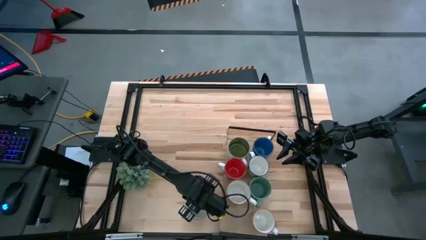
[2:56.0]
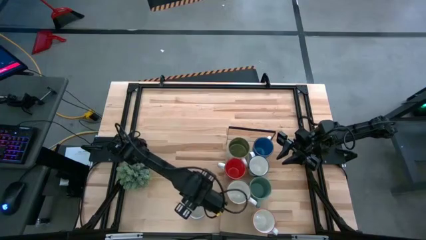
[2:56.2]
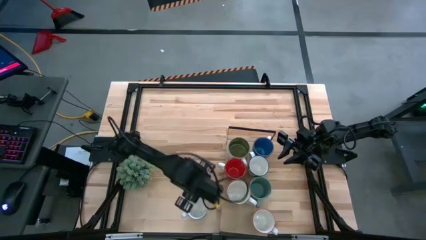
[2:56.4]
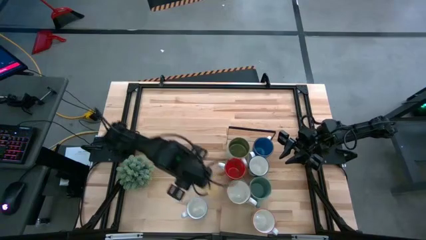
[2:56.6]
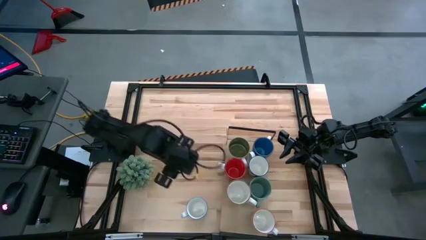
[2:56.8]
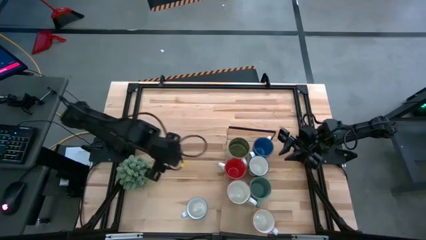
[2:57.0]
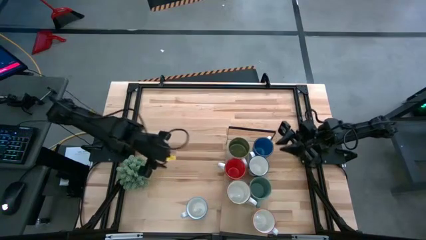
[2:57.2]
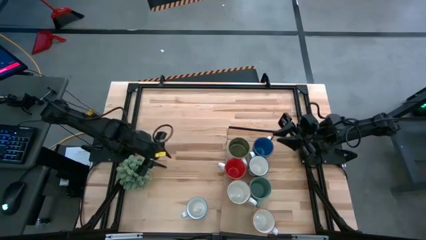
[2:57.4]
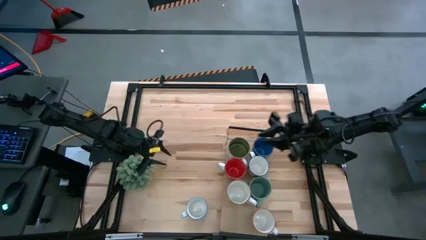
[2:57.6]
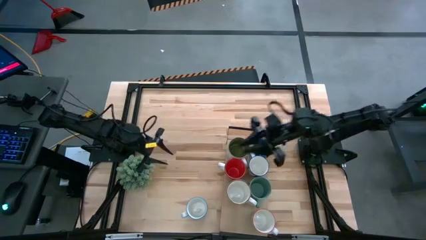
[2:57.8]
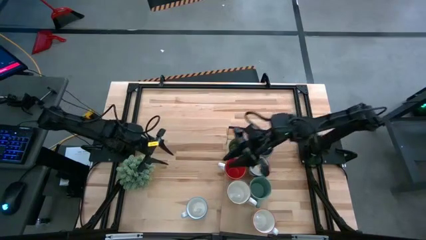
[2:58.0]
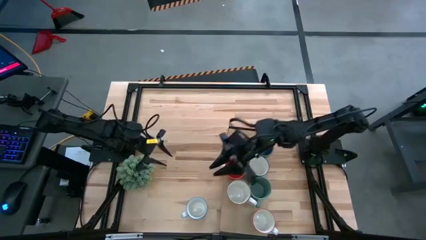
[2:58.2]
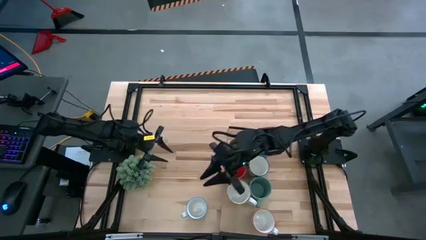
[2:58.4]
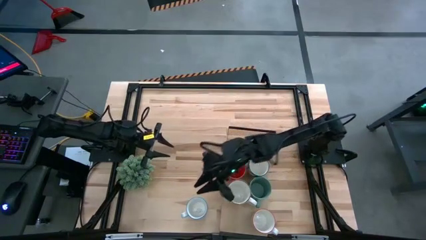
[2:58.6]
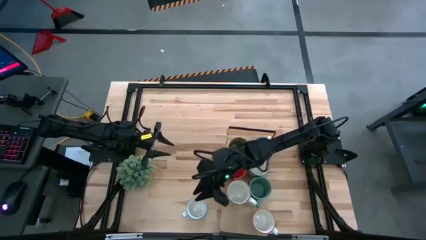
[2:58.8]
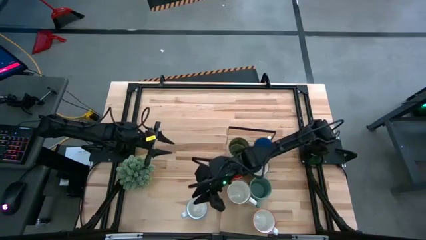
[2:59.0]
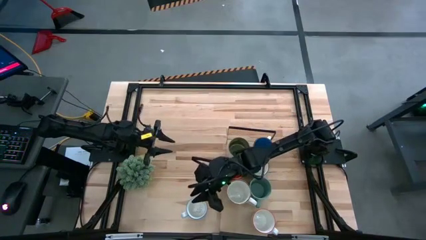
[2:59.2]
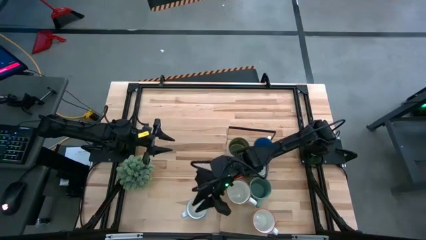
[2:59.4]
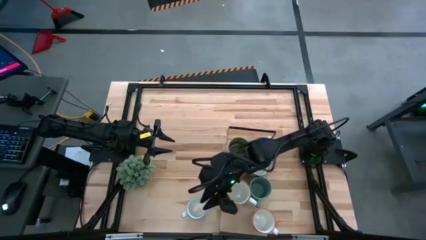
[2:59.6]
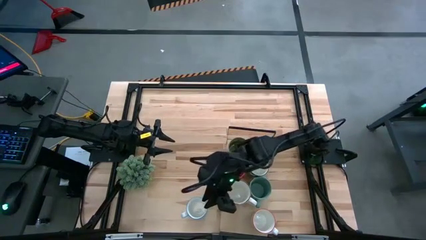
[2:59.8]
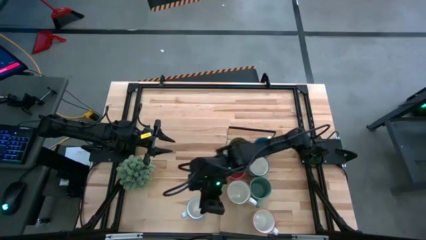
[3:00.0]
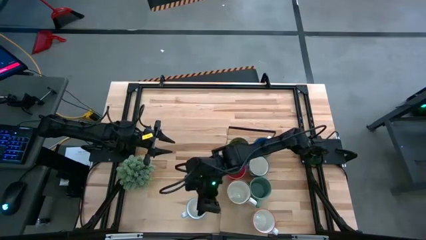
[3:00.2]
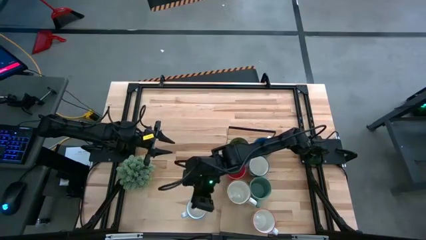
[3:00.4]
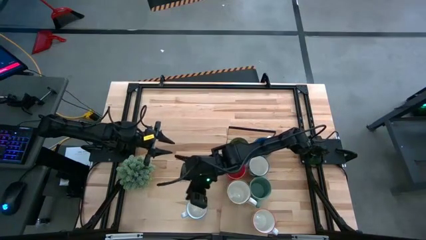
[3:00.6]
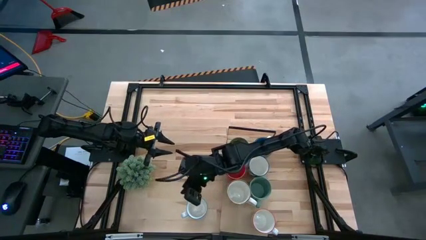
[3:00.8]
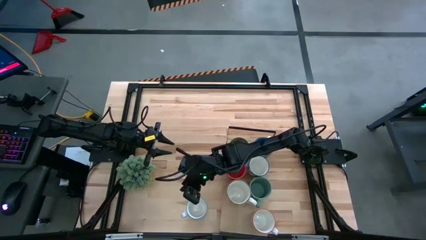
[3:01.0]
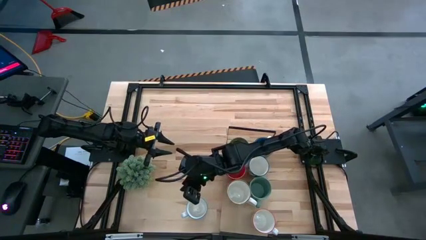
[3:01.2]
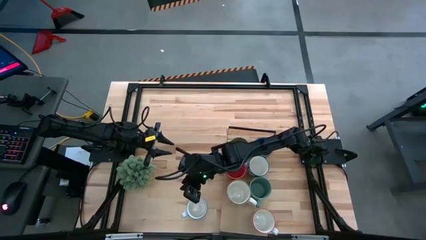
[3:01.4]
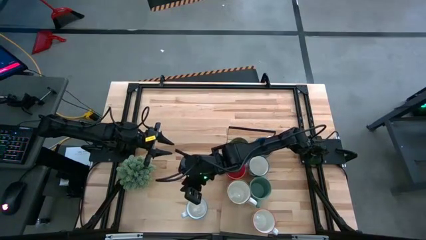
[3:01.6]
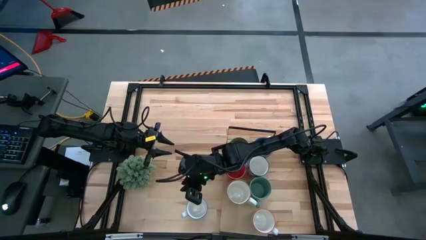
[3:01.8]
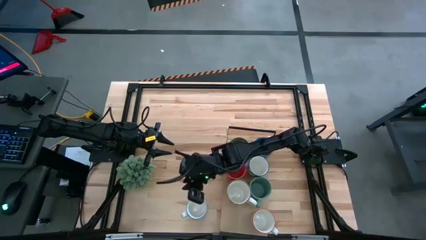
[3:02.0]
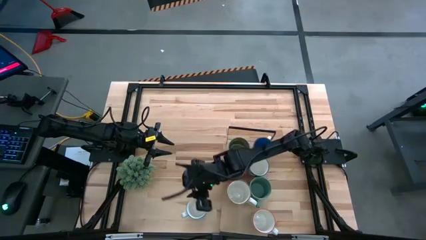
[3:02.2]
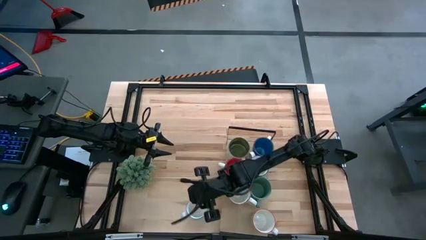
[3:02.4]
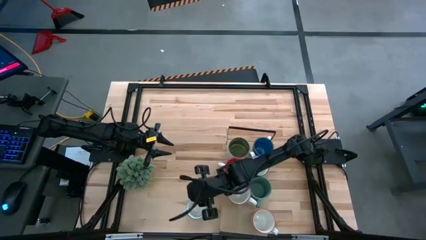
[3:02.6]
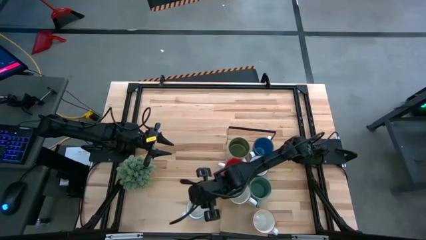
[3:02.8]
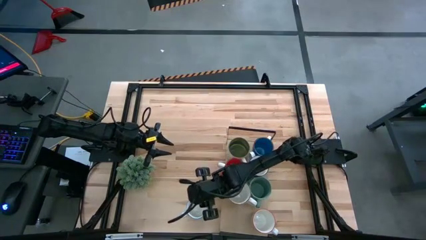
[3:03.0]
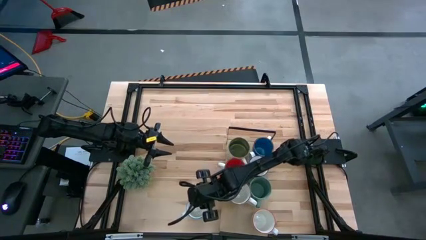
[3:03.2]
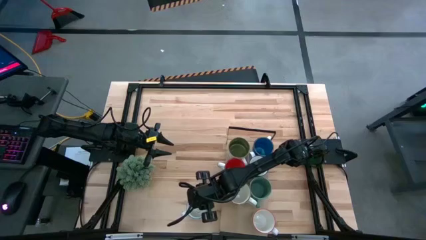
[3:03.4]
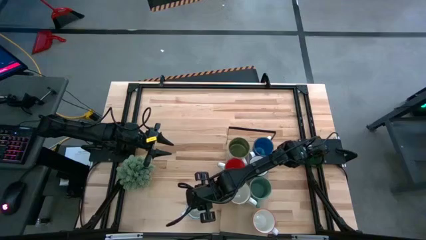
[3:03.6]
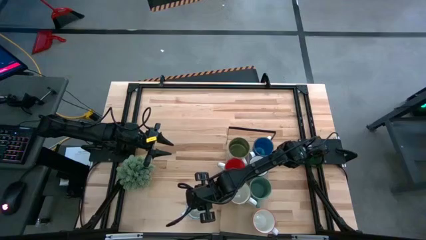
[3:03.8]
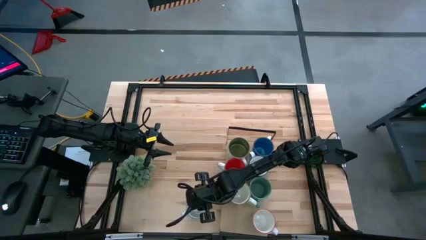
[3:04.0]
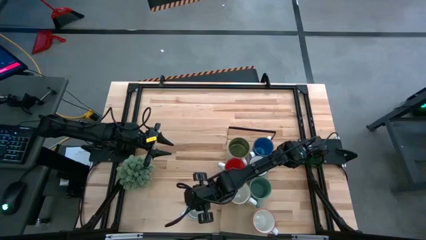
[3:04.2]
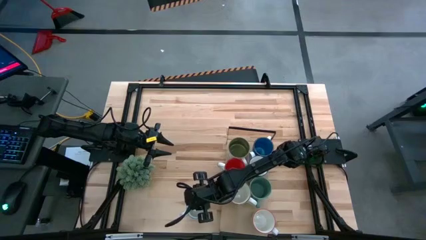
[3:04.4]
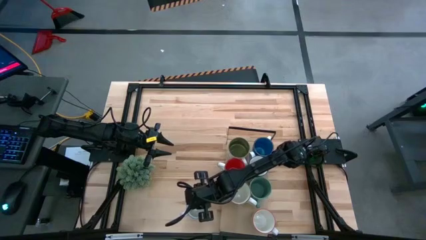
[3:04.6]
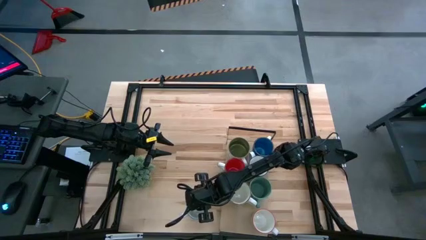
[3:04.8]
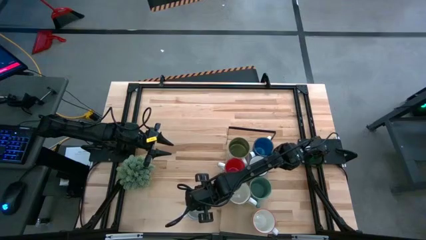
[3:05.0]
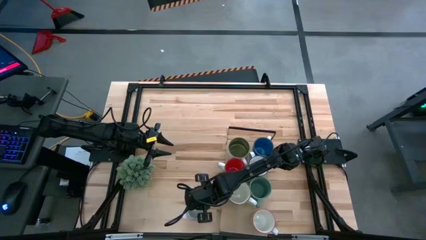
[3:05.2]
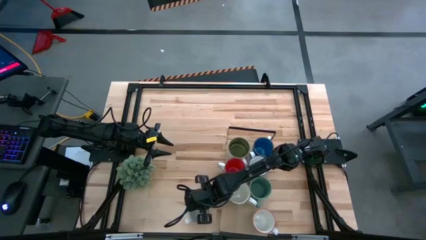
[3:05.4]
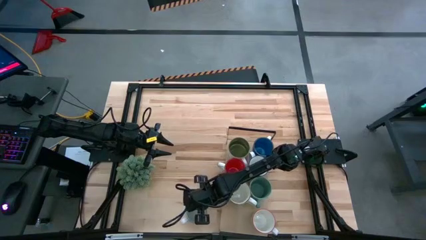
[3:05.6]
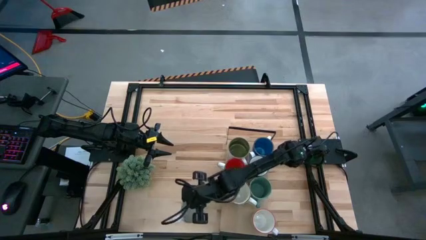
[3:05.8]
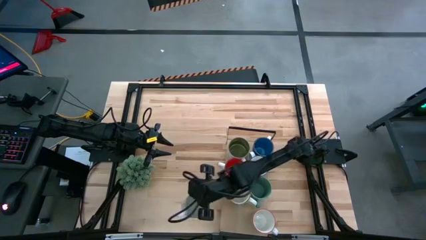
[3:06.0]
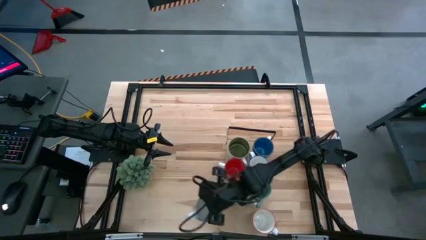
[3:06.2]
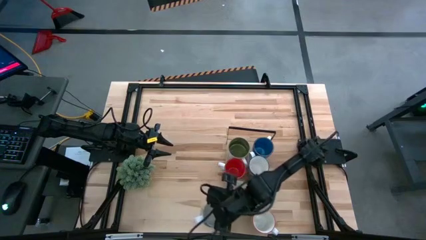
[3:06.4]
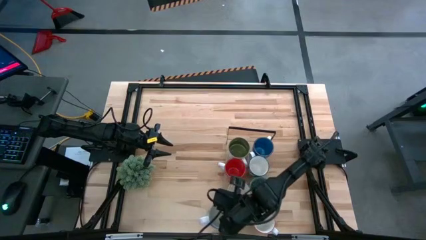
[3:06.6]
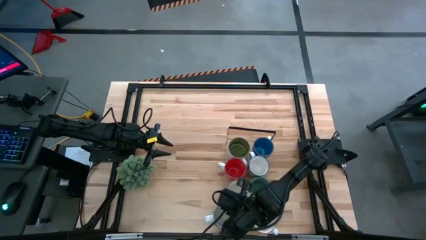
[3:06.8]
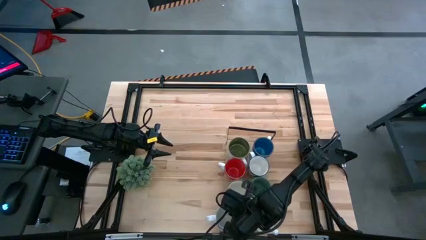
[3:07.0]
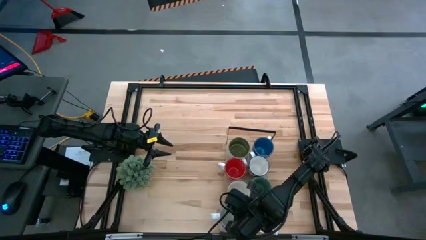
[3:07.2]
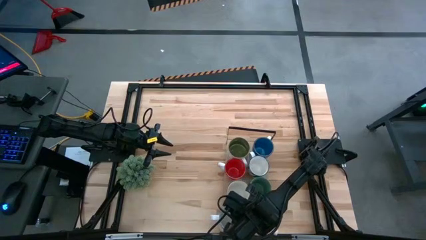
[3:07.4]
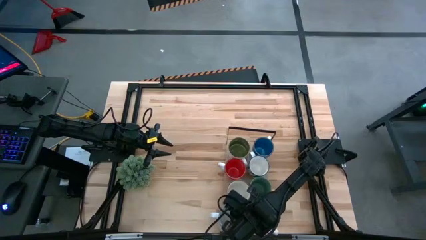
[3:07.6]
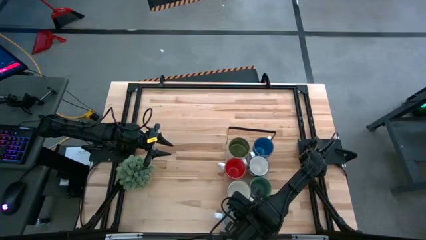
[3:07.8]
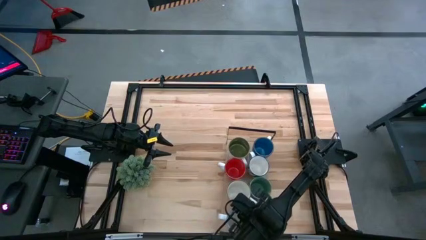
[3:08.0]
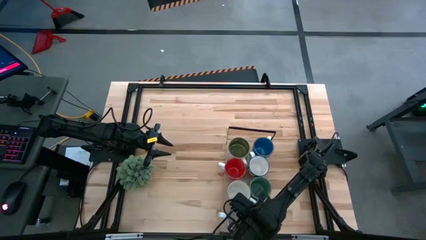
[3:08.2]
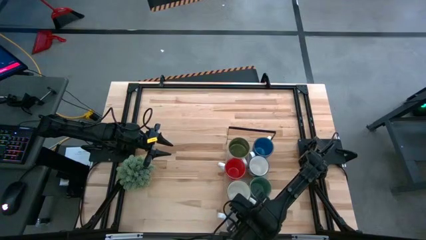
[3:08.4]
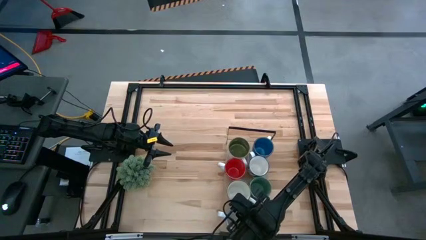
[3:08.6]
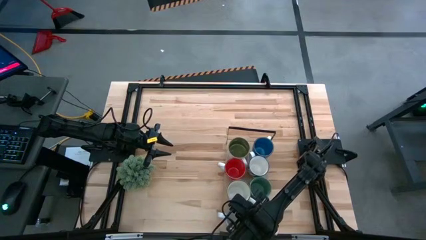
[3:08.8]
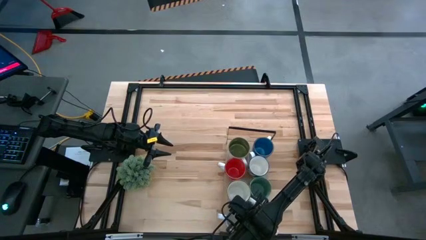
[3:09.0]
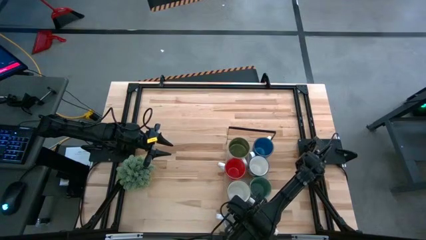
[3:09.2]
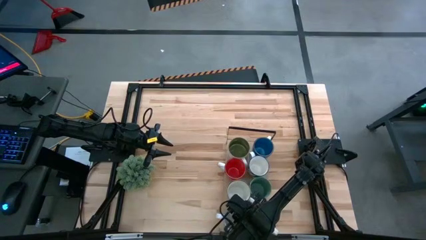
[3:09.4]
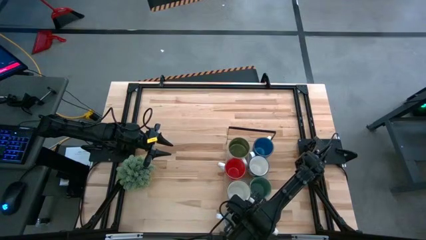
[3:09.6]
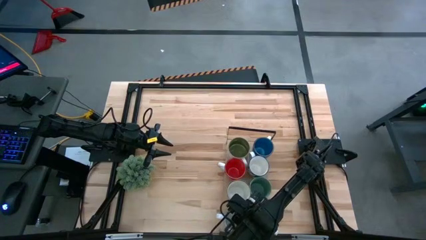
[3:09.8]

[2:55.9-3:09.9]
Task: Place coffee mugs
Put the red and white mug on the shelf
